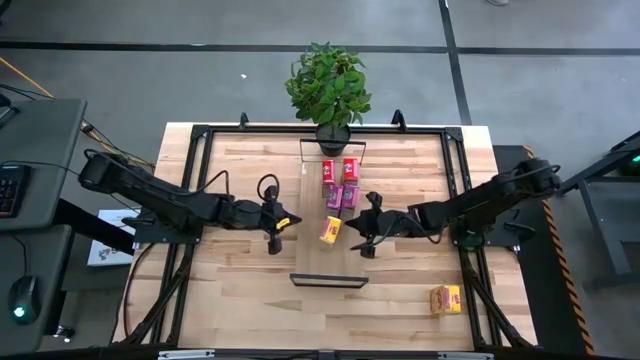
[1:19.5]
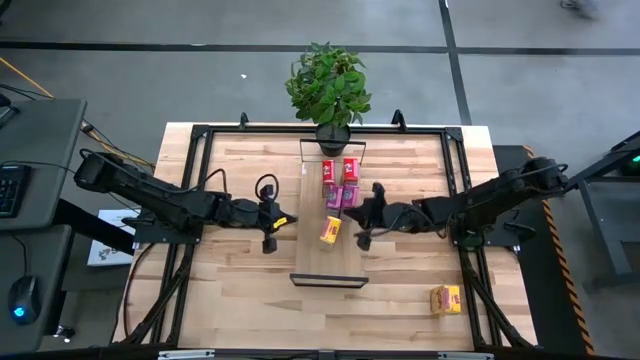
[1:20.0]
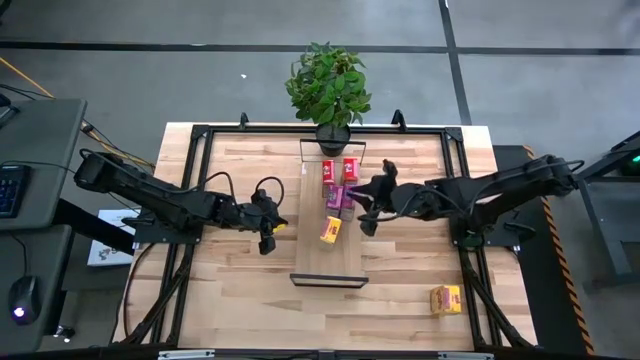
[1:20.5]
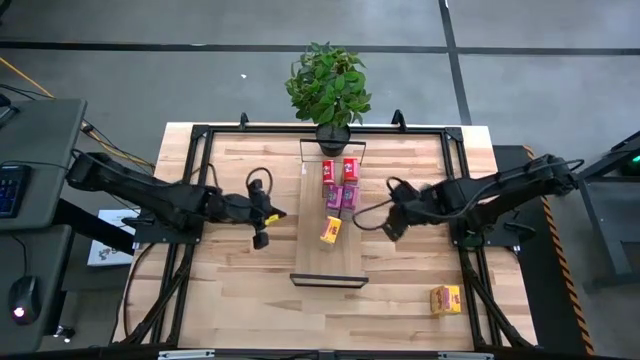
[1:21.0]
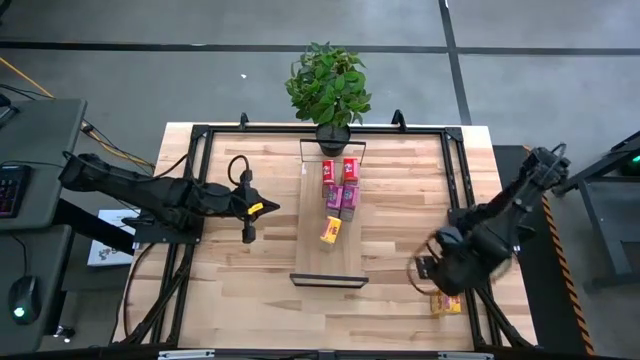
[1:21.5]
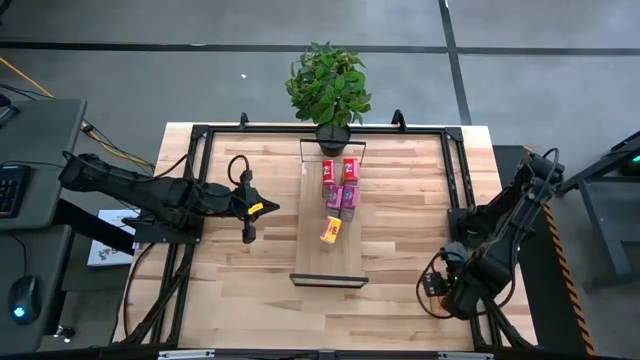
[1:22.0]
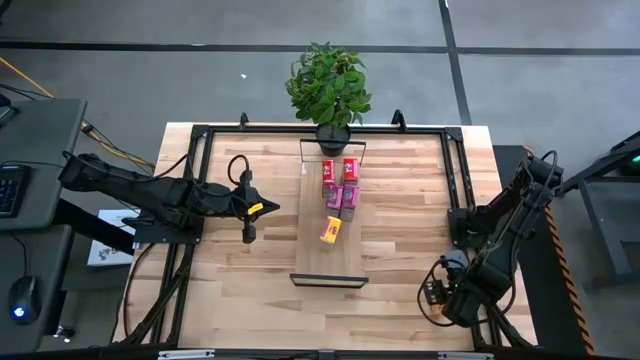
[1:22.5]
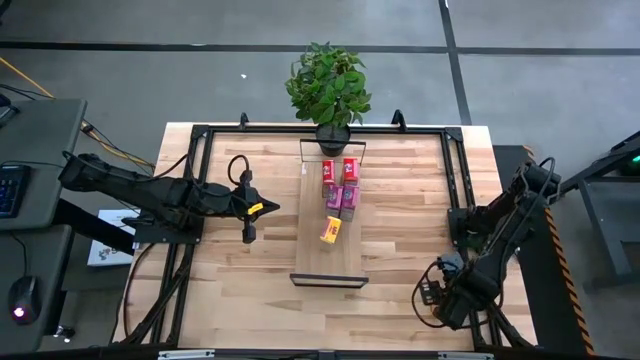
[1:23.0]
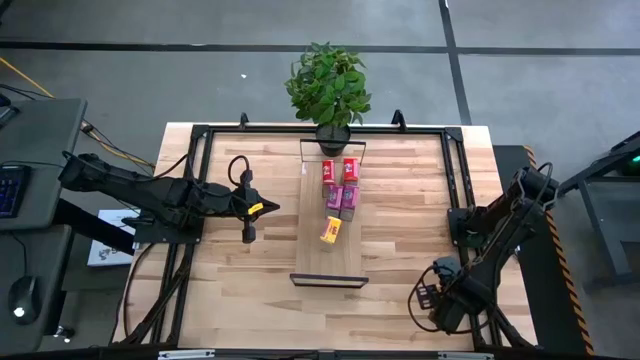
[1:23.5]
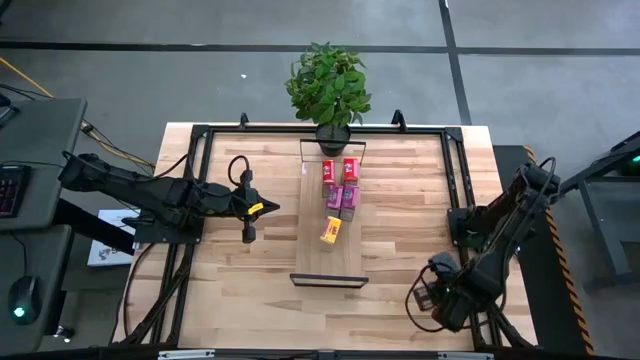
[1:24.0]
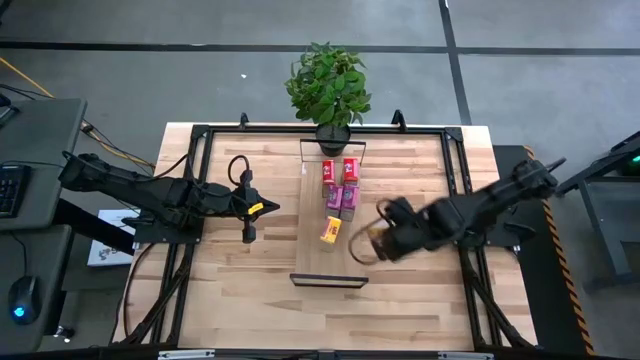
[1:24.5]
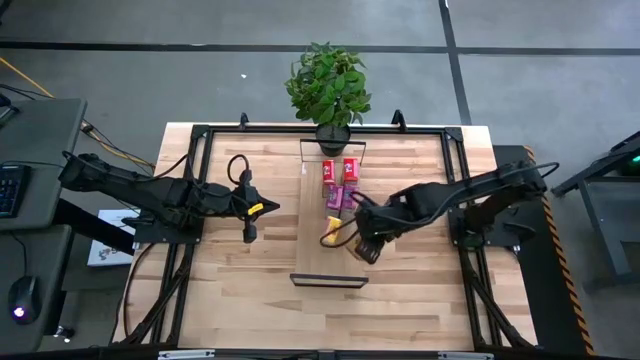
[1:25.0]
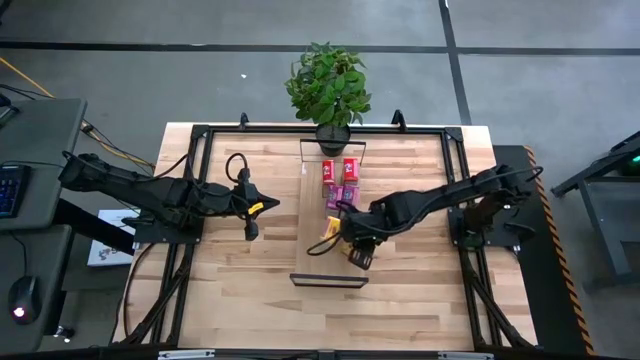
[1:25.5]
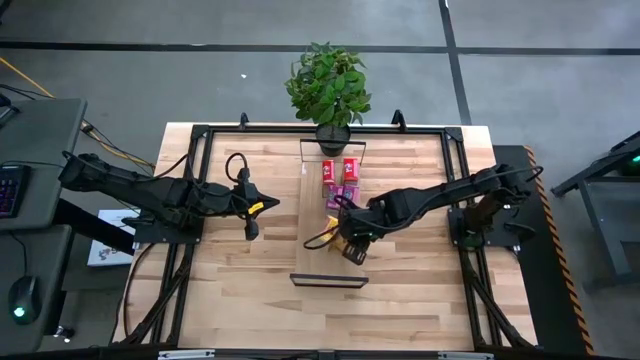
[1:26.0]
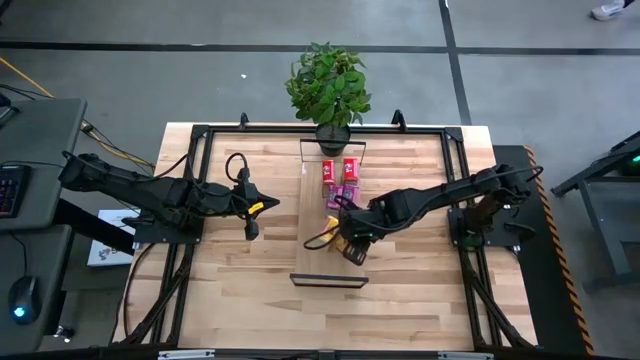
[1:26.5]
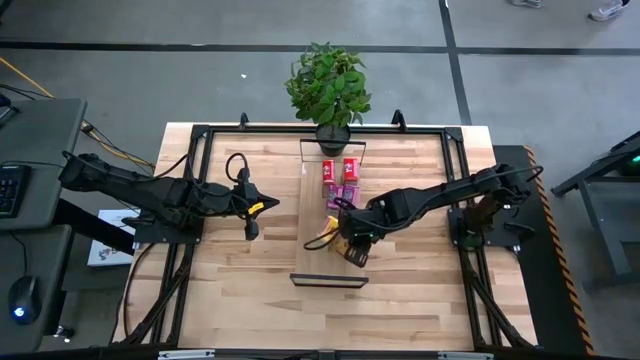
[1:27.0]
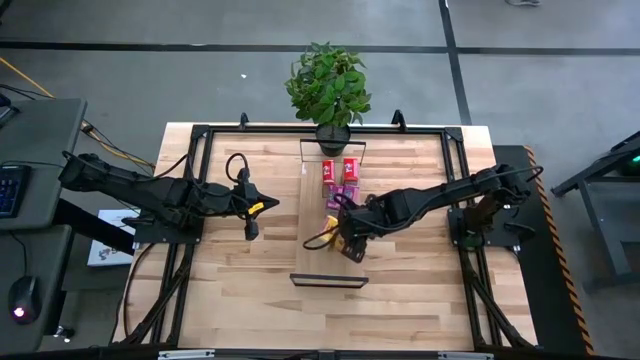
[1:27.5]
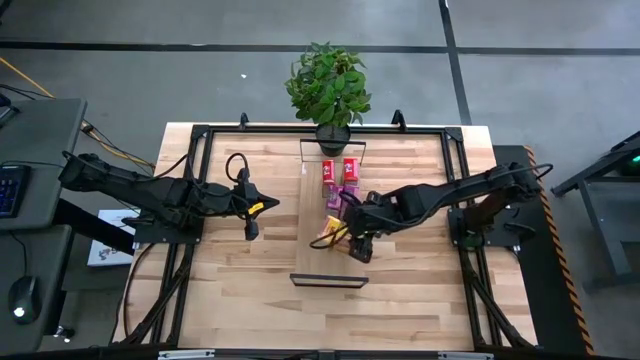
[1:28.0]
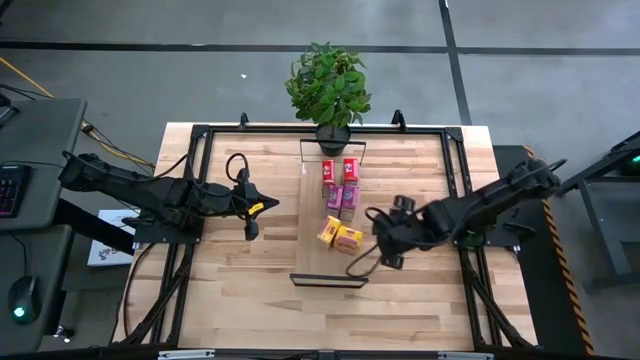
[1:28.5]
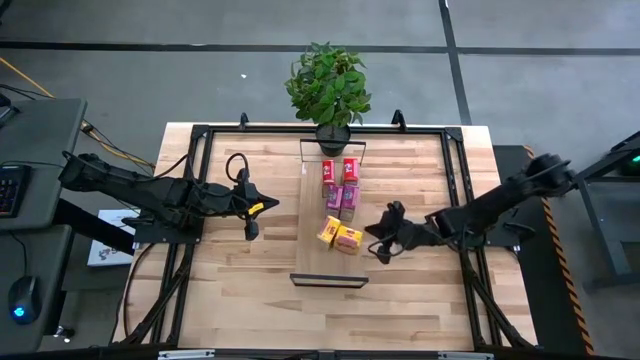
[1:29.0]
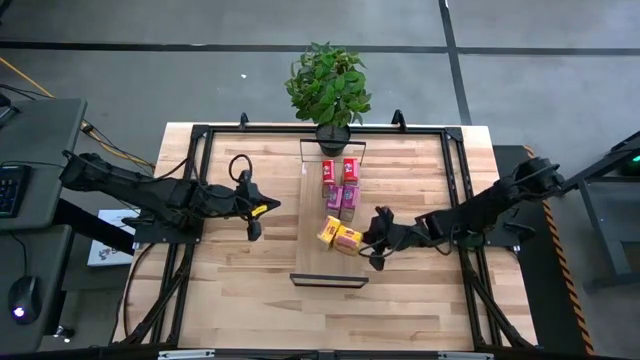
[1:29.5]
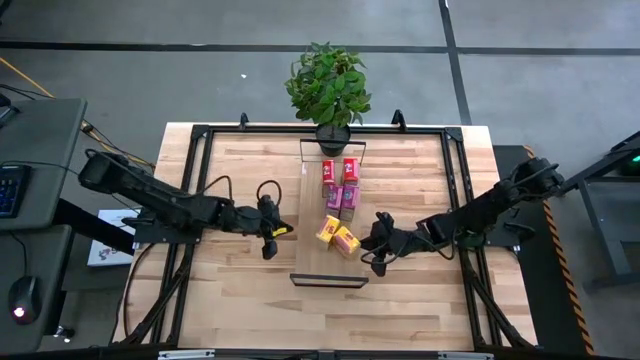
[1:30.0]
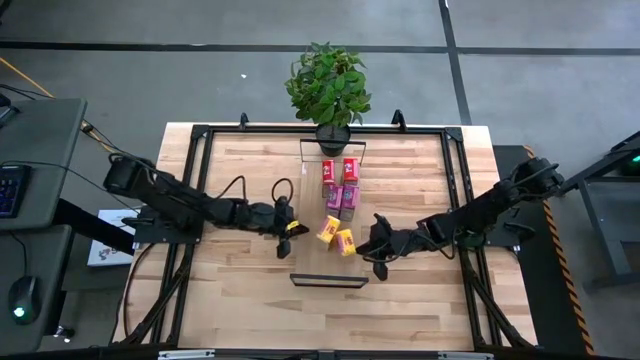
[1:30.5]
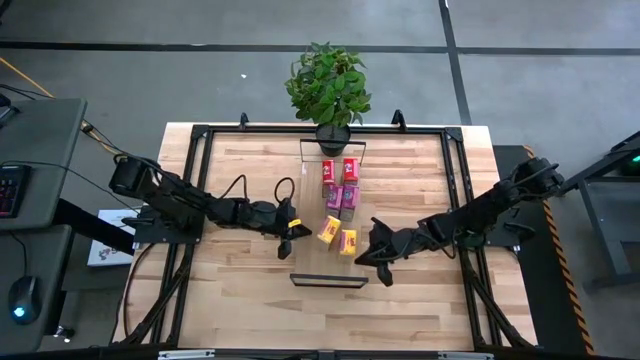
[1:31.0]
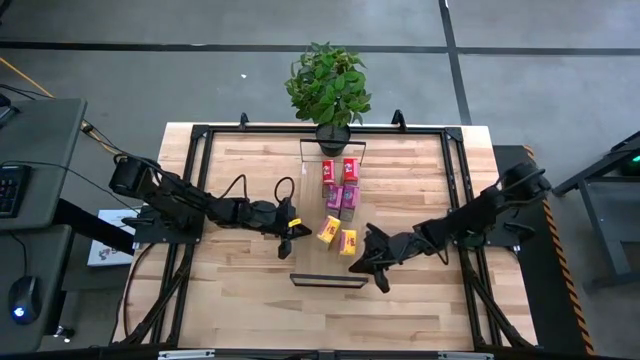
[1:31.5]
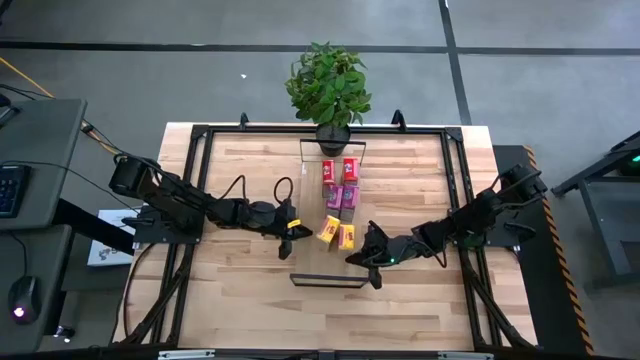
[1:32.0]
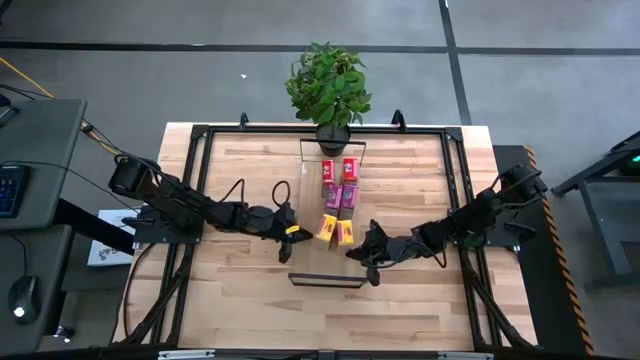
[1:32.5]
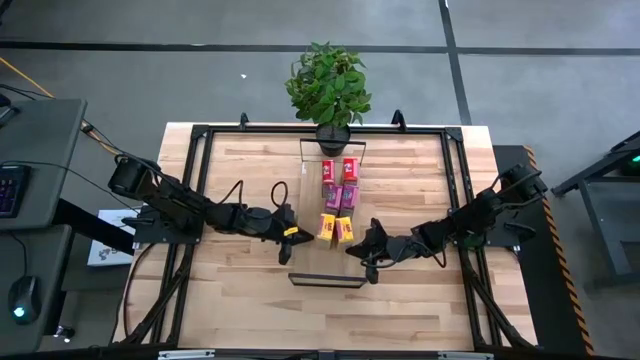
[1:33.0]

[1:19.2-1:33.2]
Task: Stack cereal on shelf
Put the yellow cereal box on the shelf aligned with the other yellow cereal box

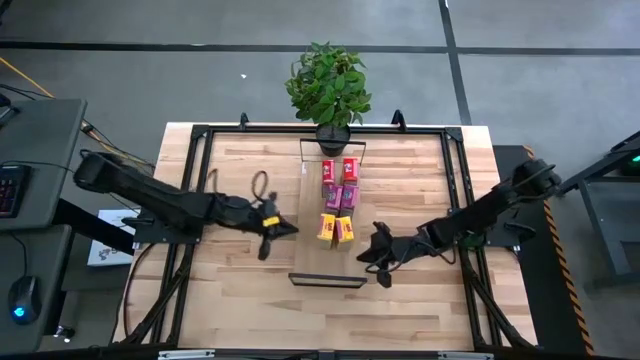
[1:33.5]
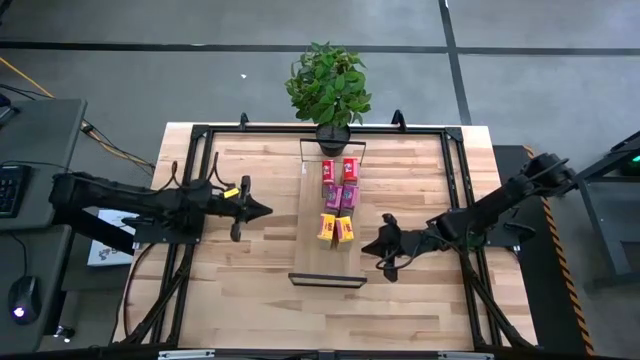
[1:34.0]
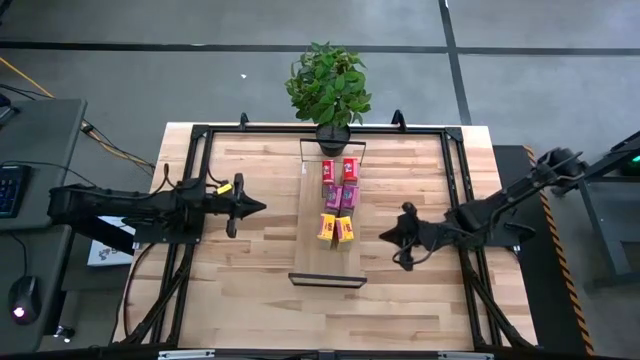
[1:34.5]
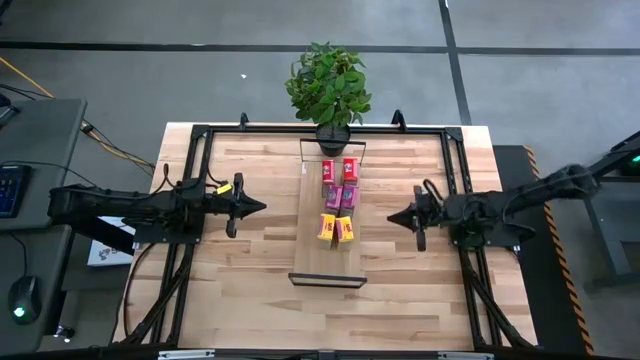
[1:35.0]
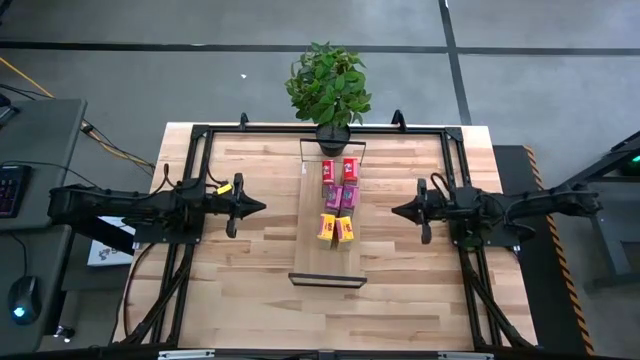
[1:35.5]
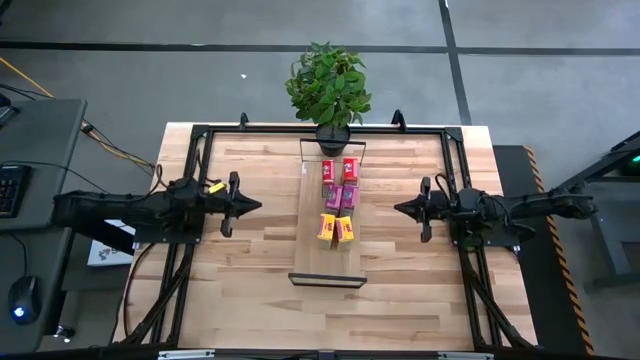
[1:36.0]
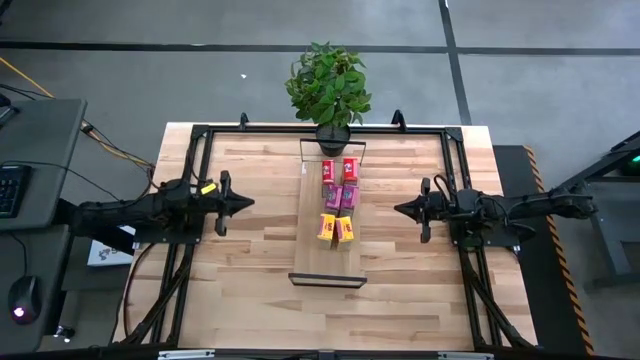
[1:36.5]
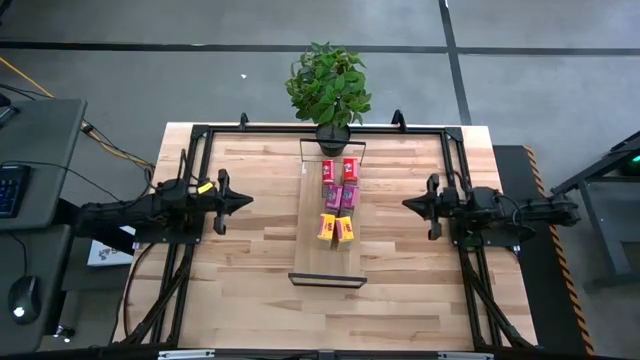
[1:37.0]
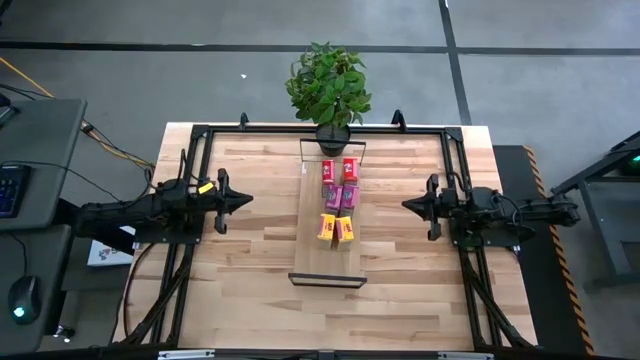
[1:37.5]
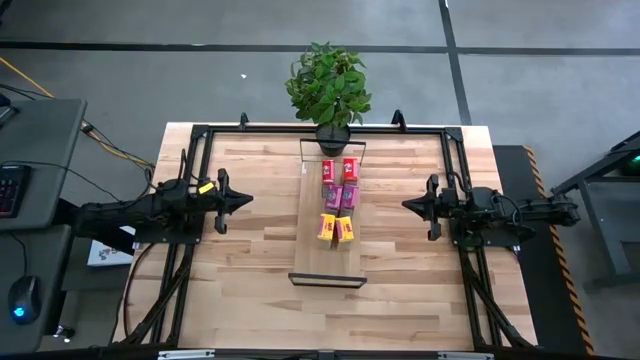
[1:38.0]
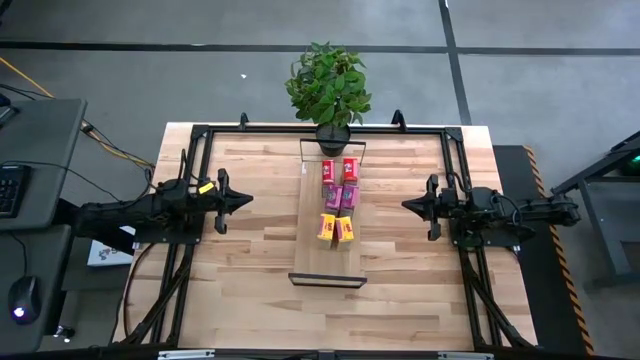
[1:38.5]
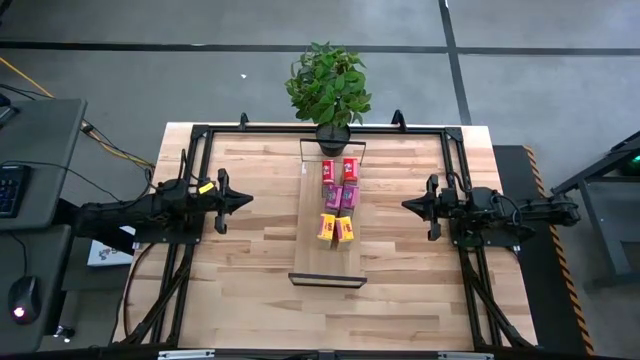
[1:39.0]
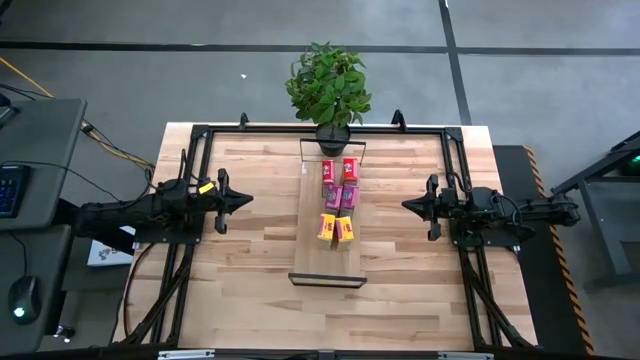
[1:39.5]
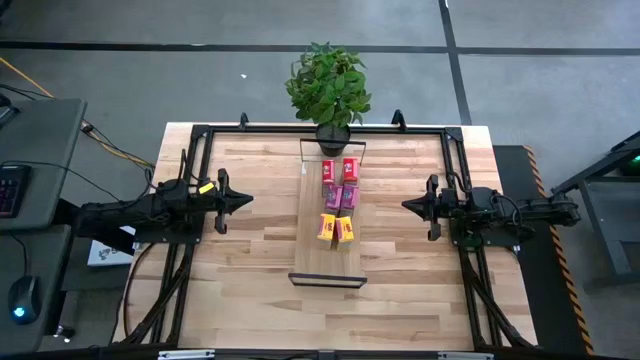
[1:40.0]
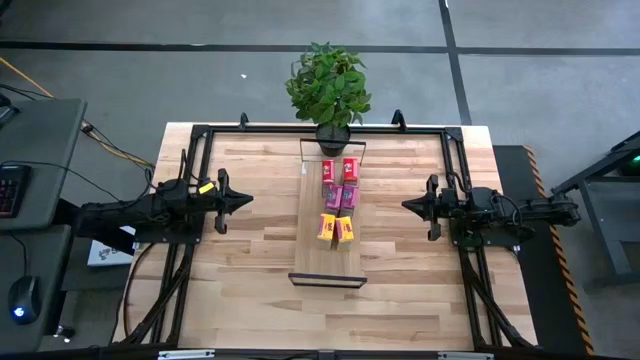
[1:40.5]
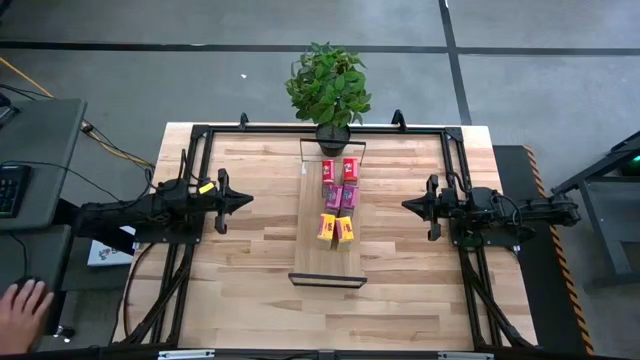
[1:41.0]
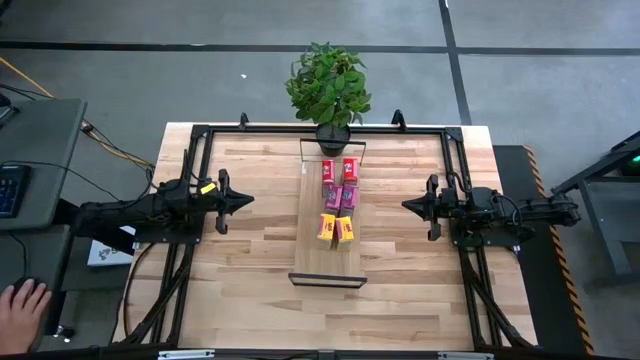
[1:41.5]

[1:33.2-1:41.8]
Return to Home Position
